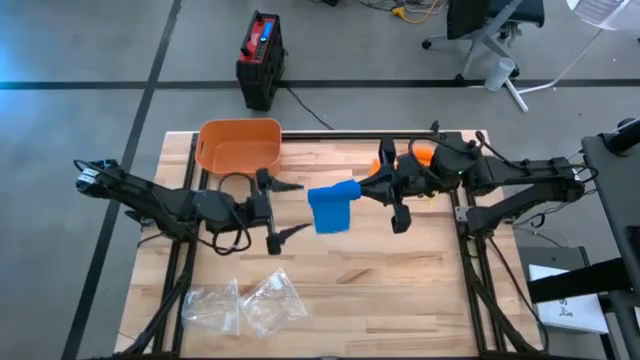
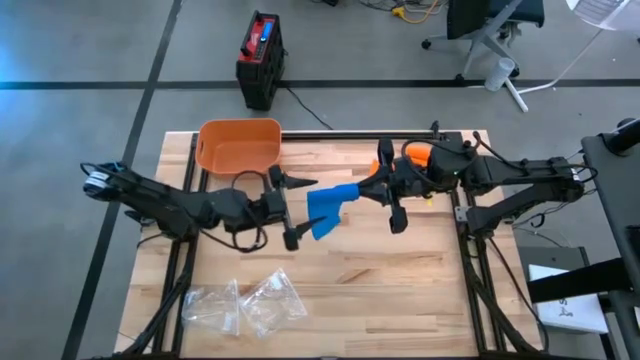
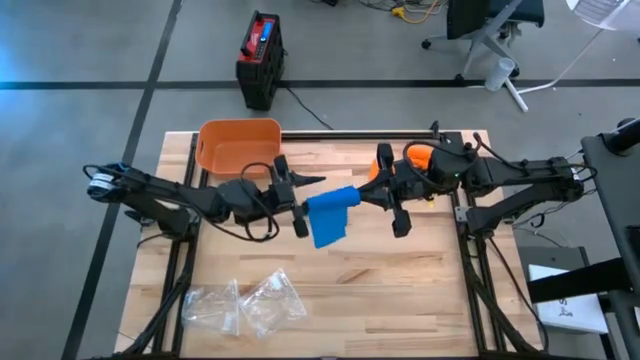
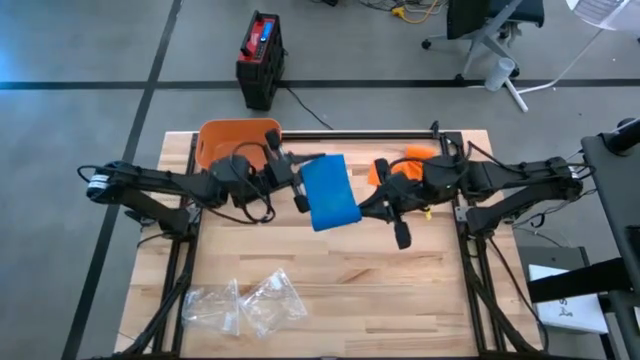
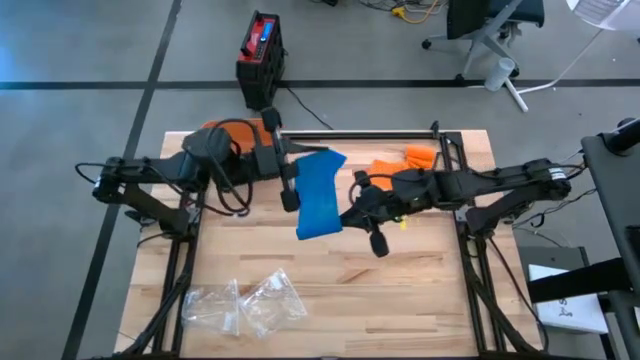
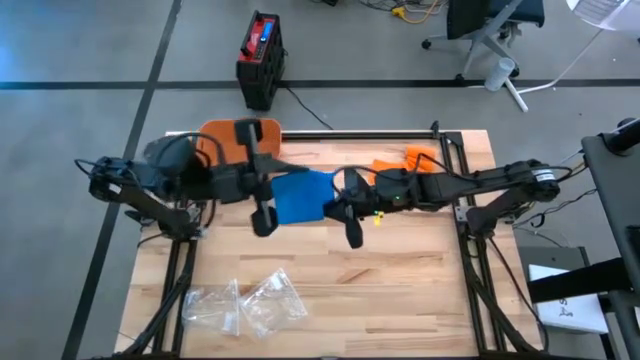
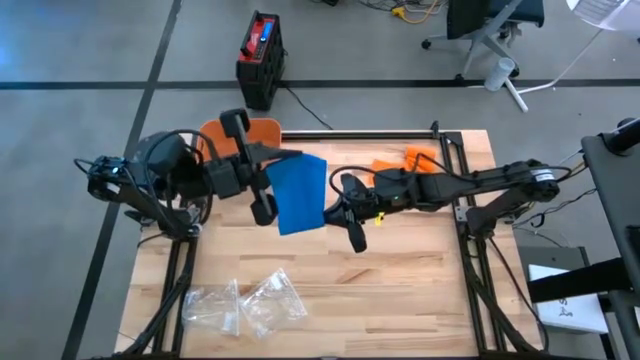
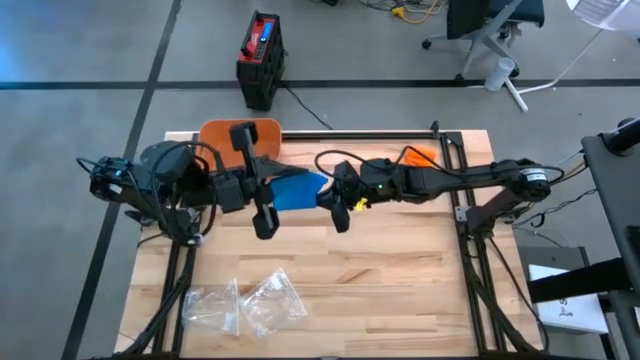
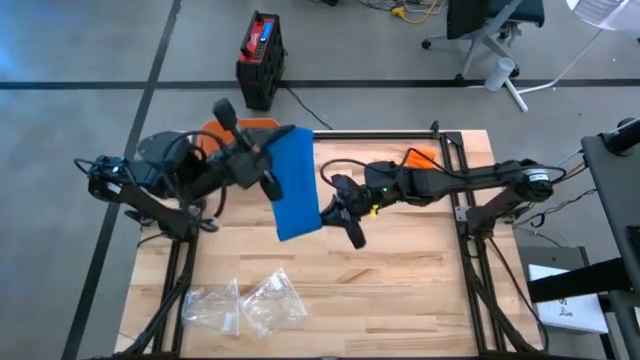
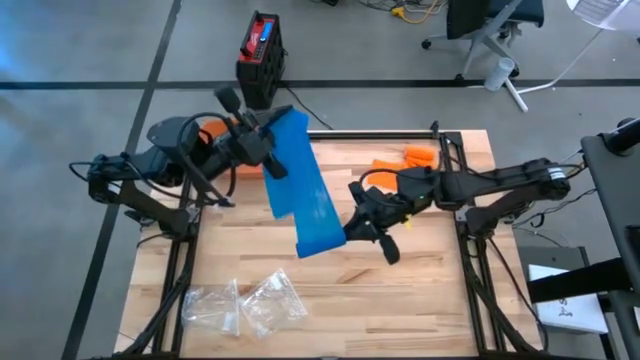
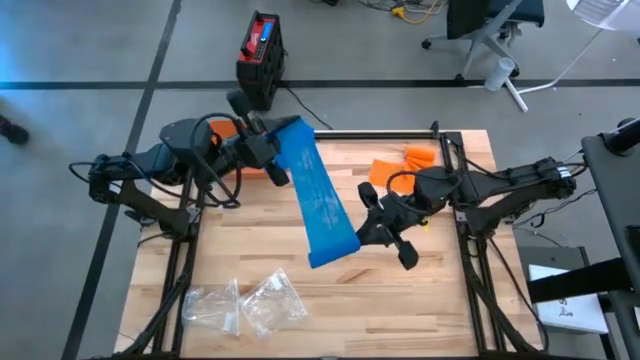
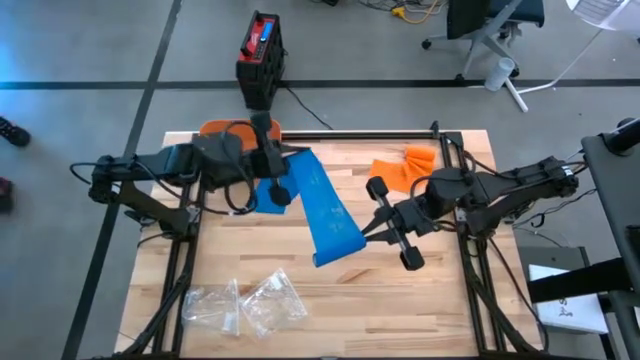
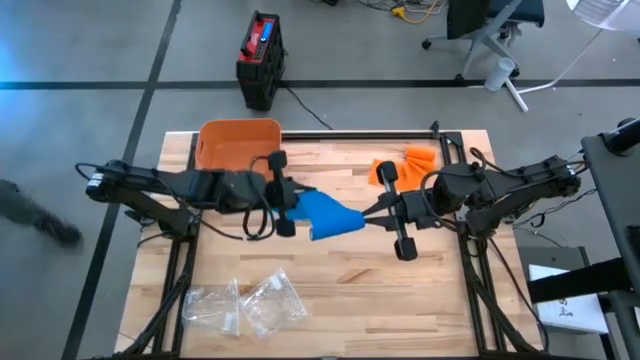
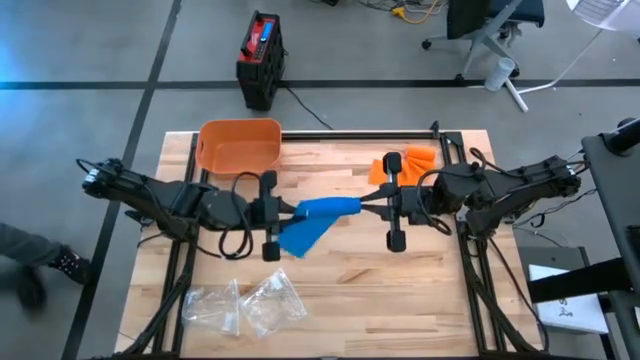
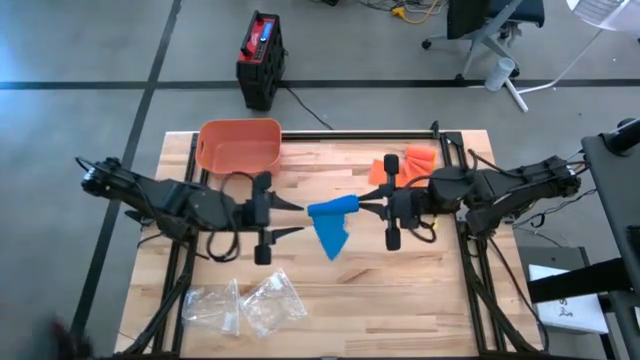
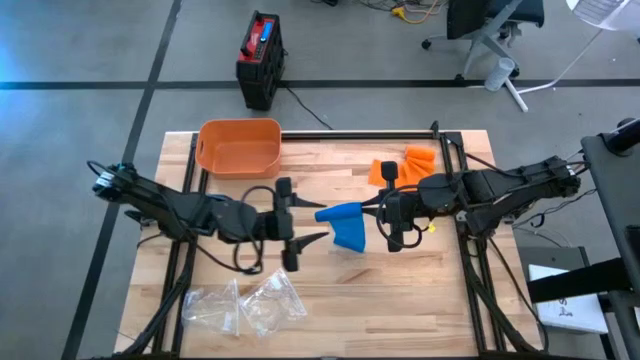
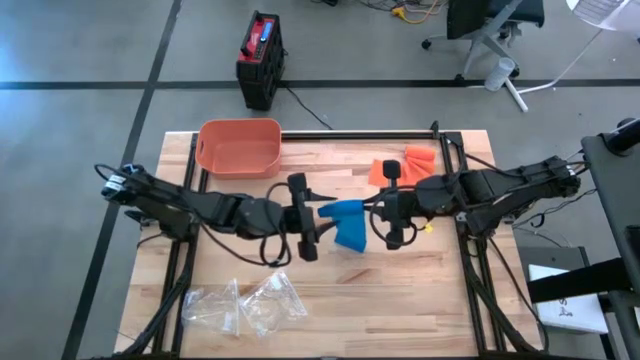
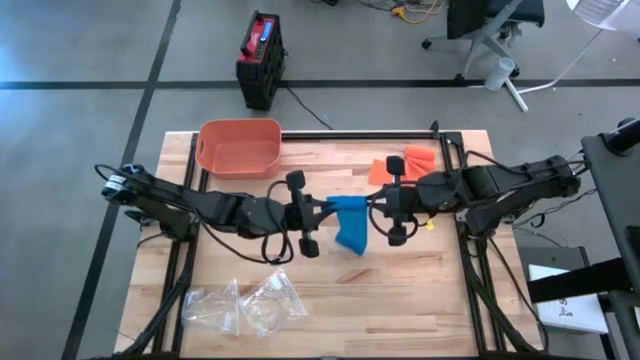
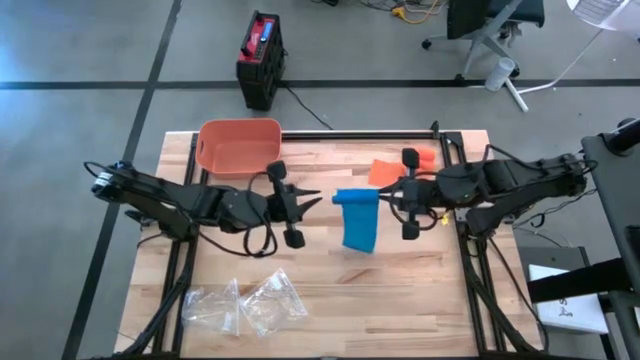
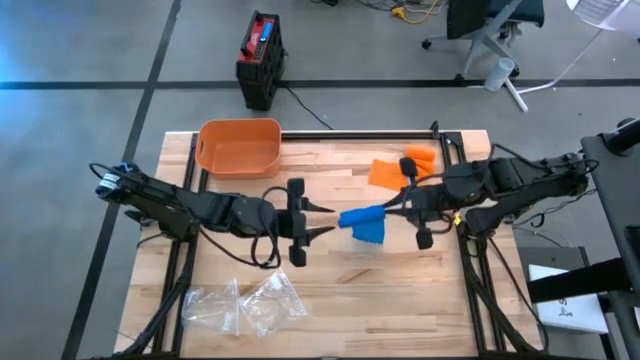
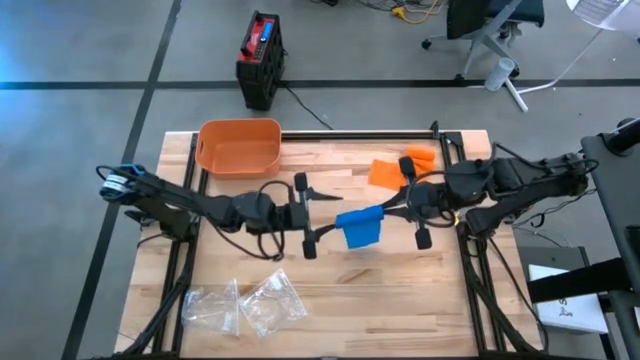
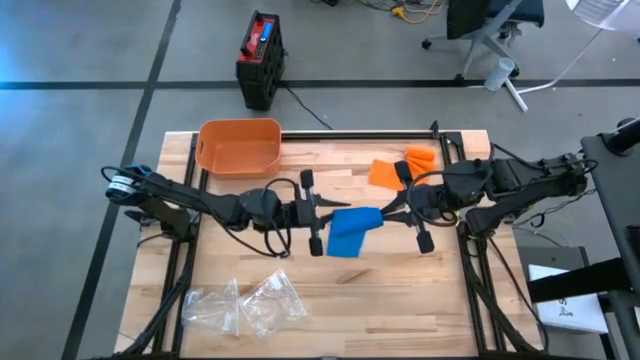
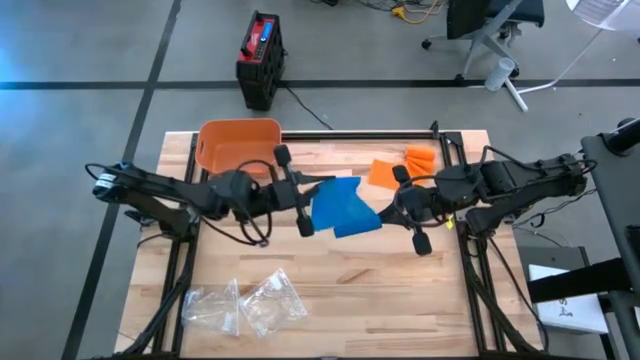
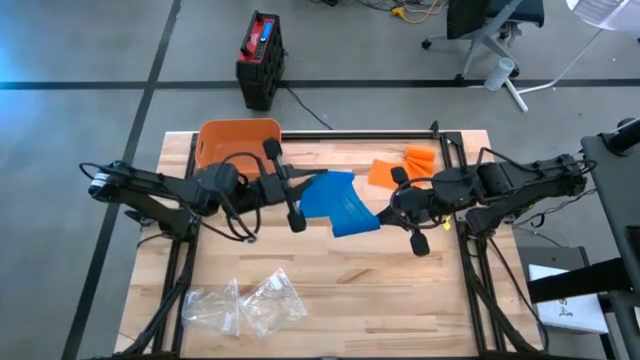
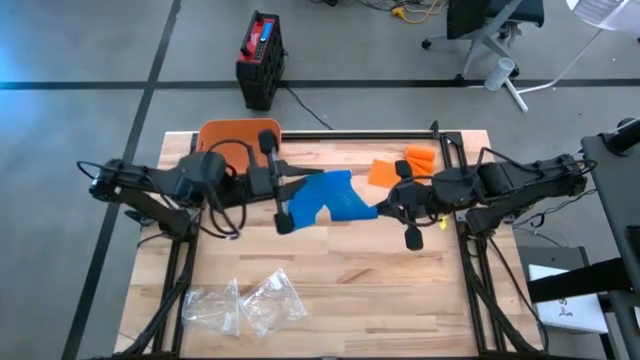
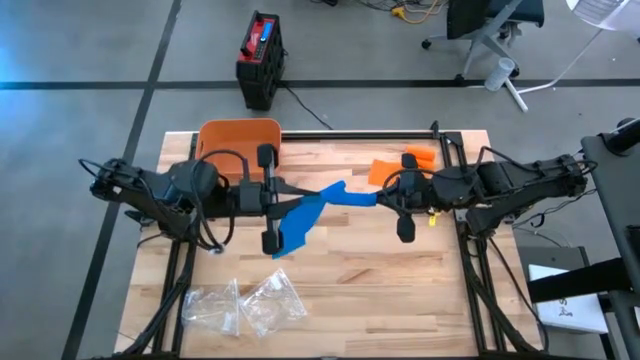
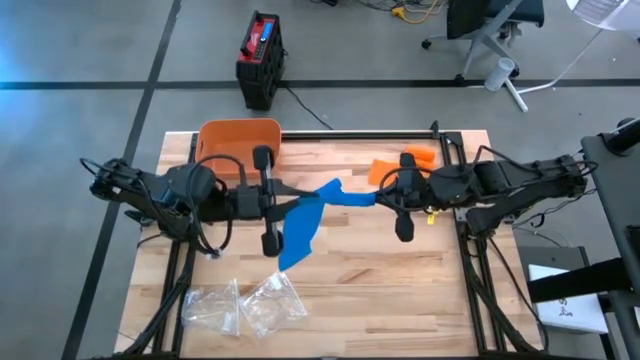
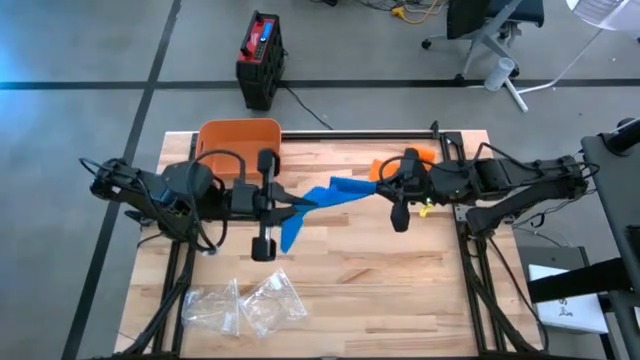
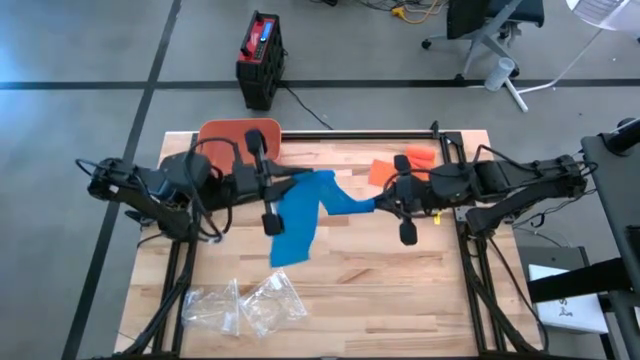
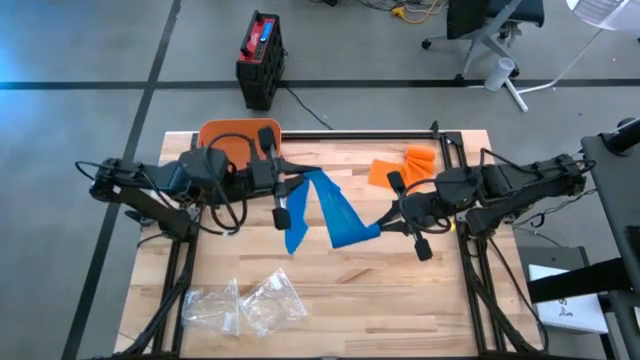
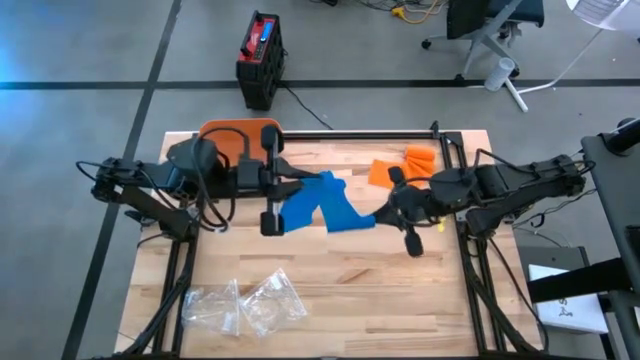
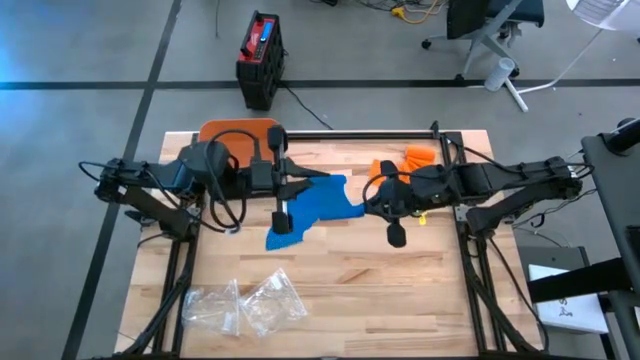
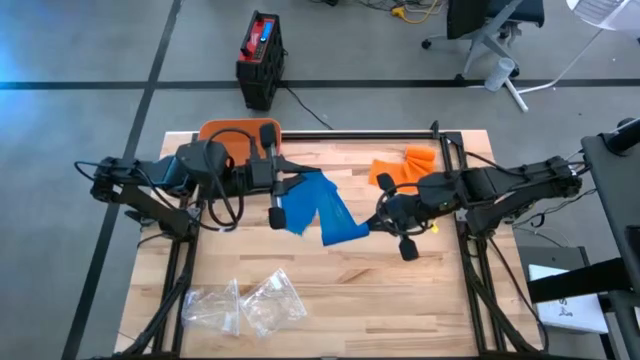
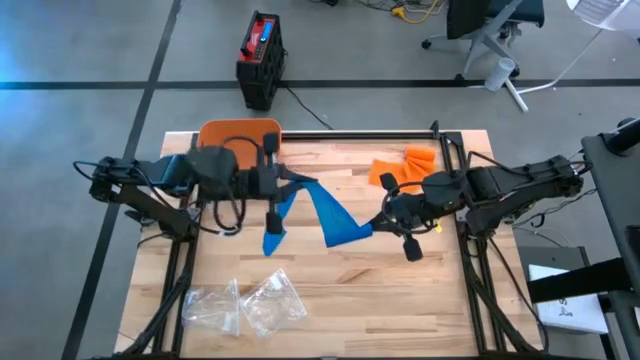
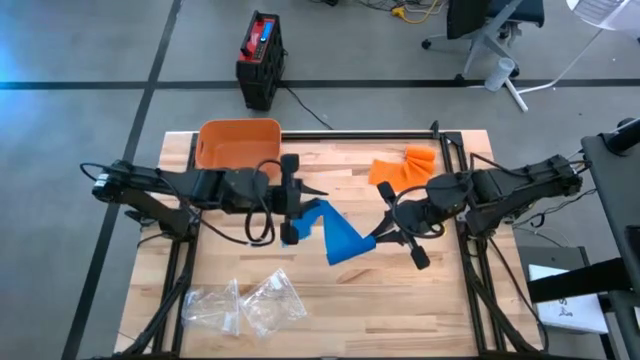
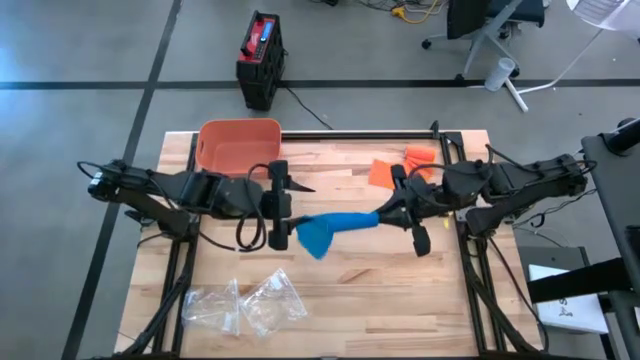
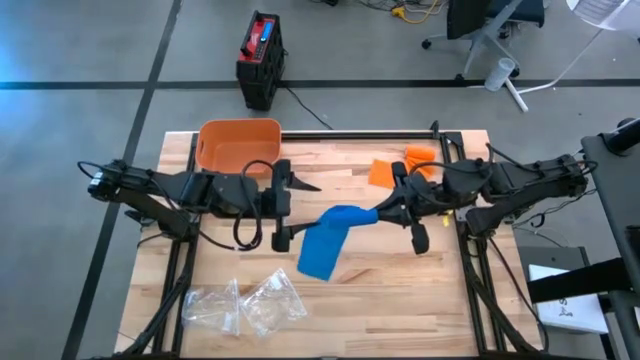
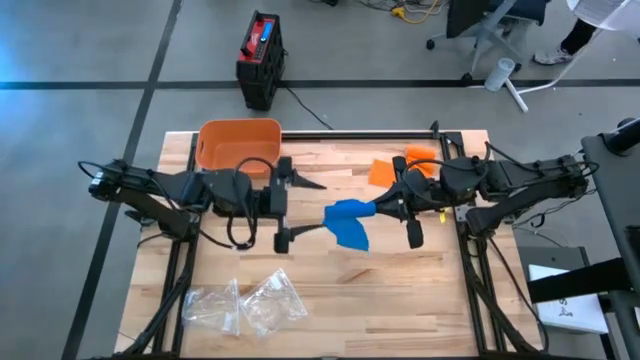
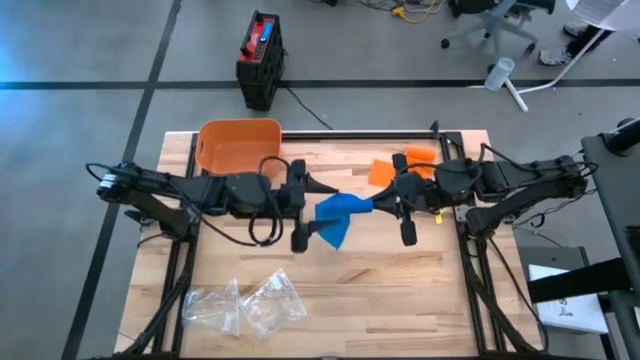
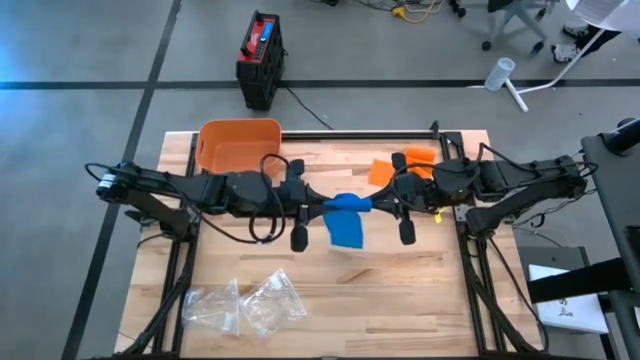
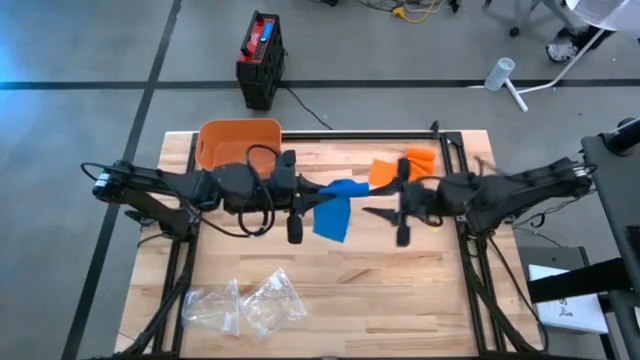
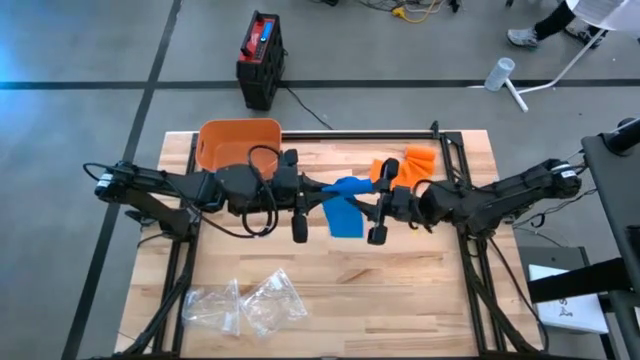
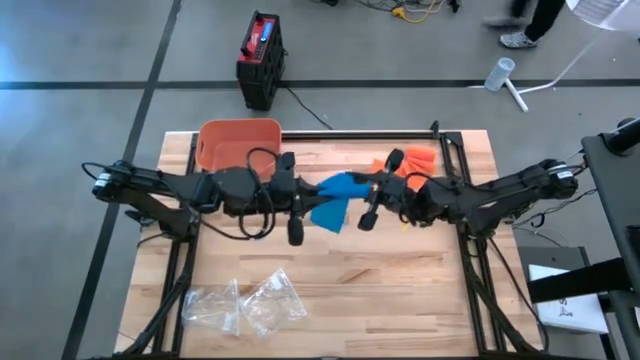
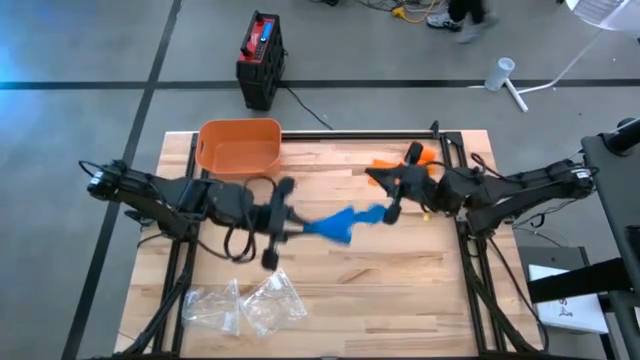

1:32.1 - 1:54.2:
Task: Roll bandage
Roll the blue bandage
